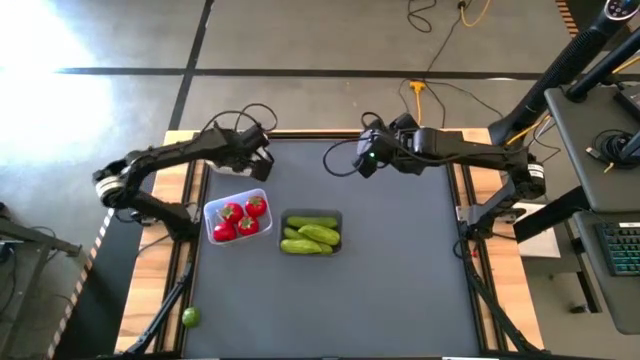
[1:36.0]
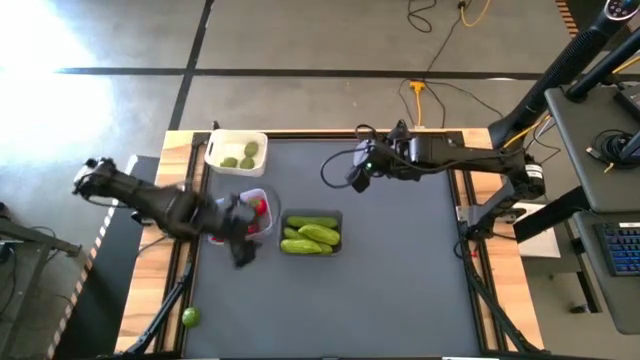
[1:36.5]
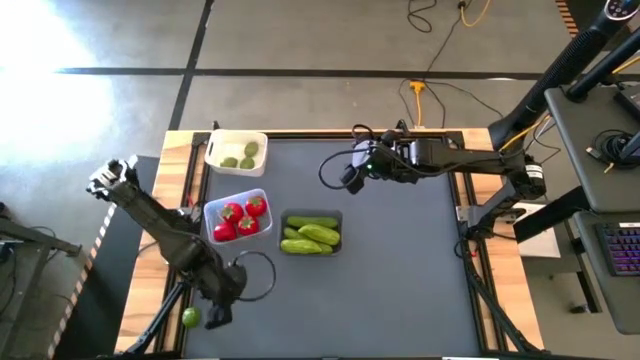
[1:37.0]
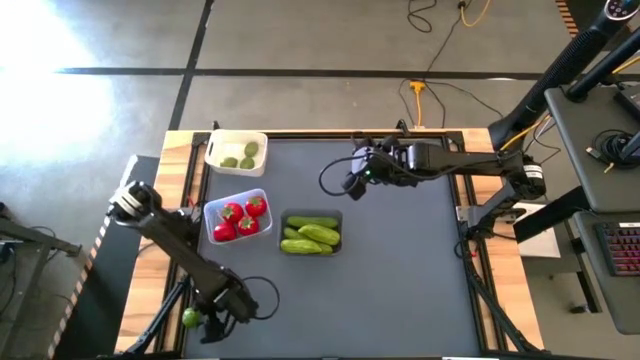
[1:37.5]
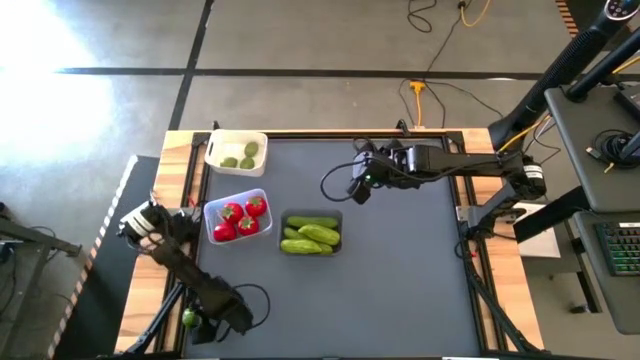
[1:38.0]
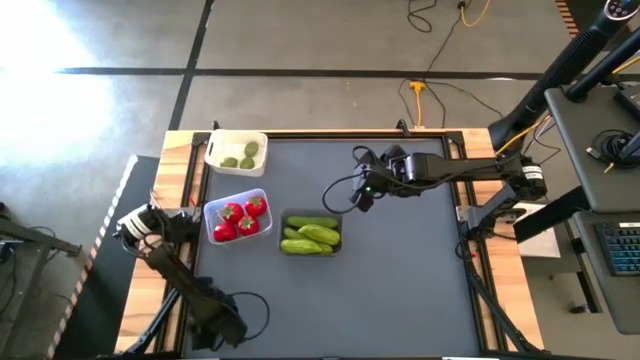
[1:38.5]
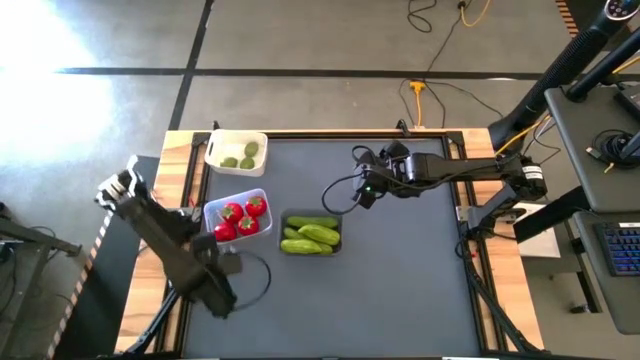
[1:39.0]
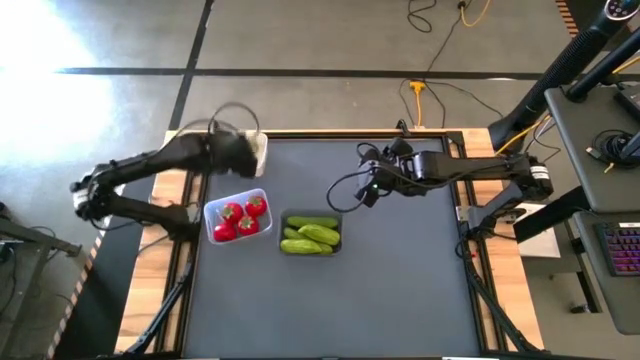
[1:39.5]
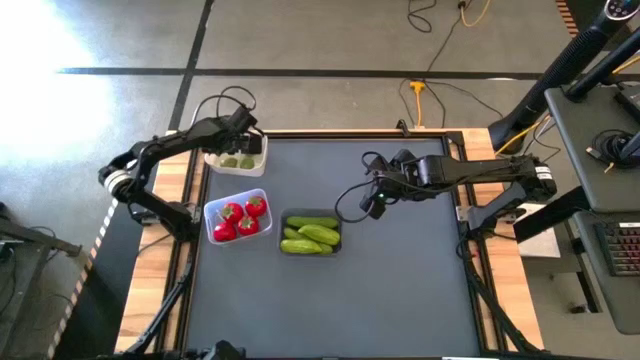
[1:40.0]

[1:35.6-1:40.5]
Task: Sort produce into baskets
Put the lemon into the white bin

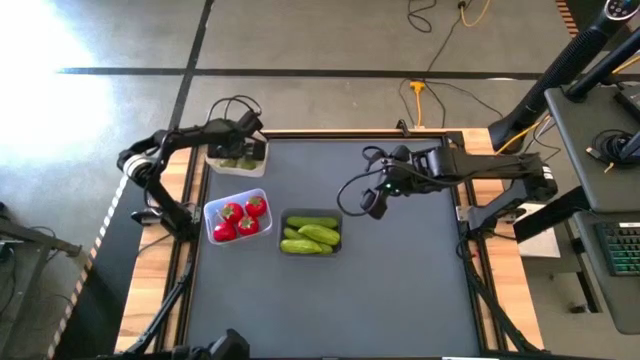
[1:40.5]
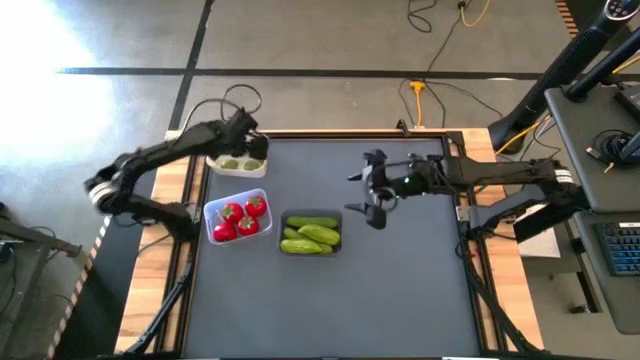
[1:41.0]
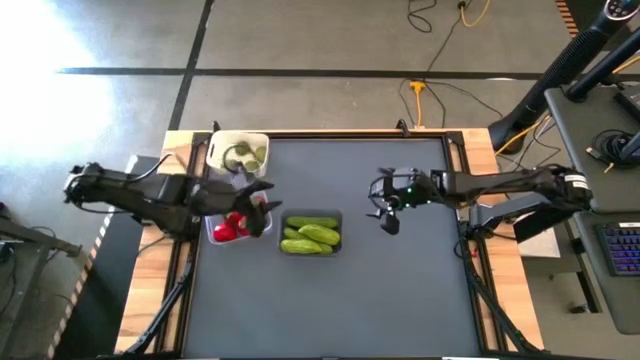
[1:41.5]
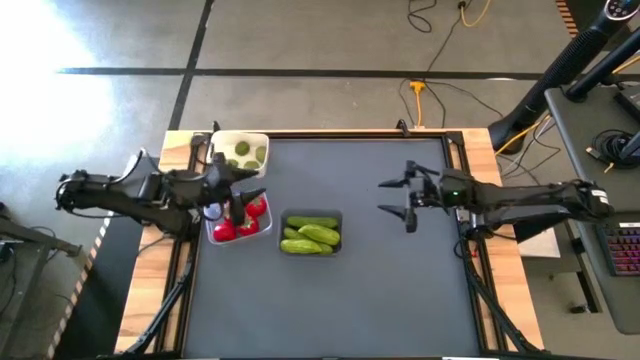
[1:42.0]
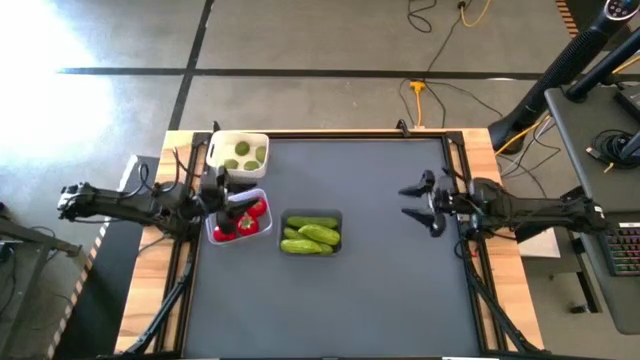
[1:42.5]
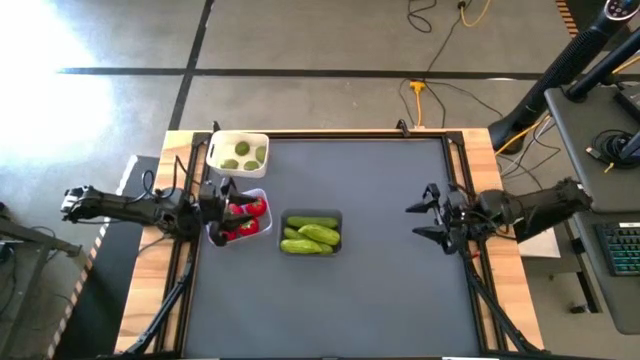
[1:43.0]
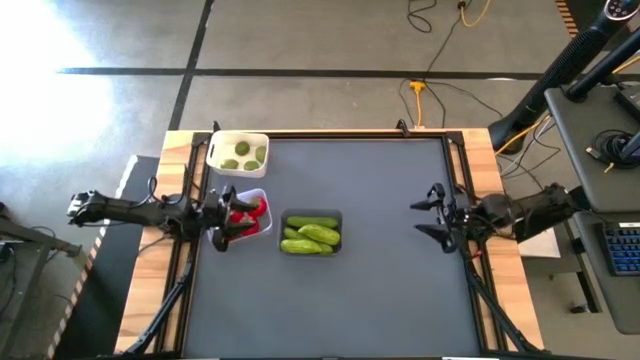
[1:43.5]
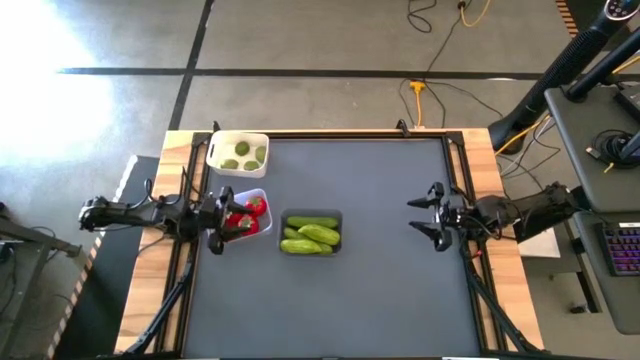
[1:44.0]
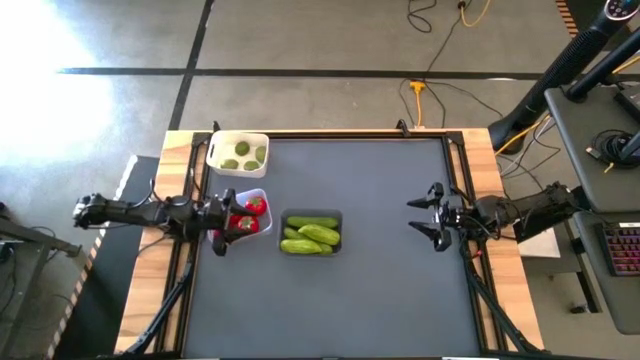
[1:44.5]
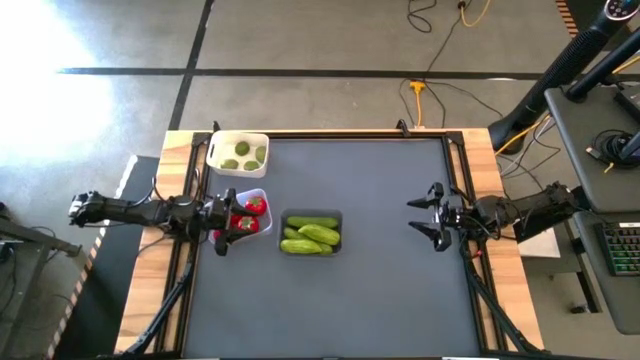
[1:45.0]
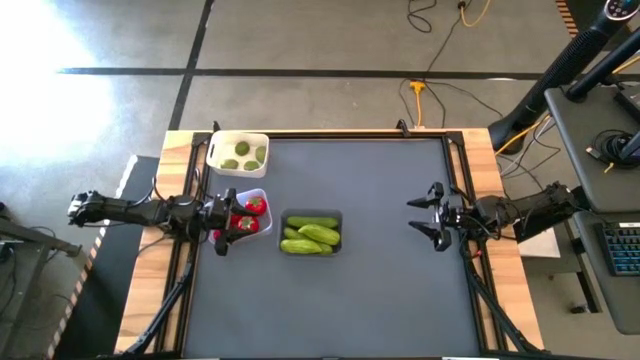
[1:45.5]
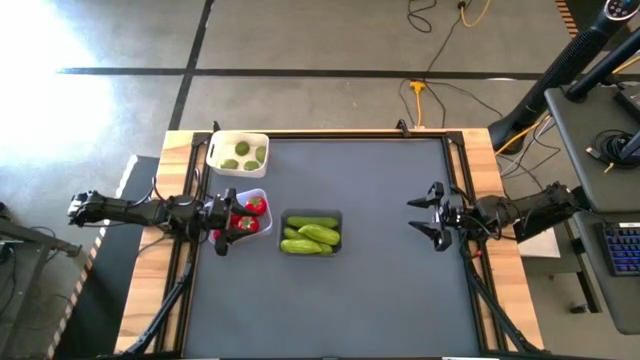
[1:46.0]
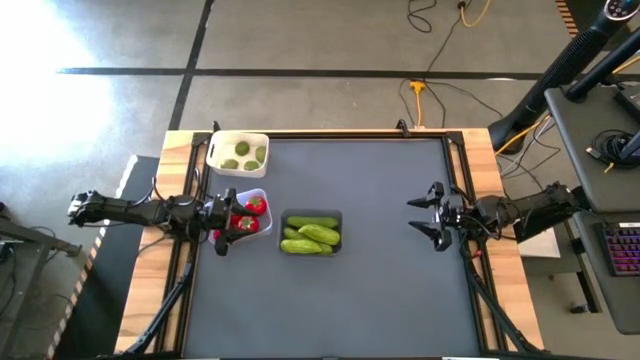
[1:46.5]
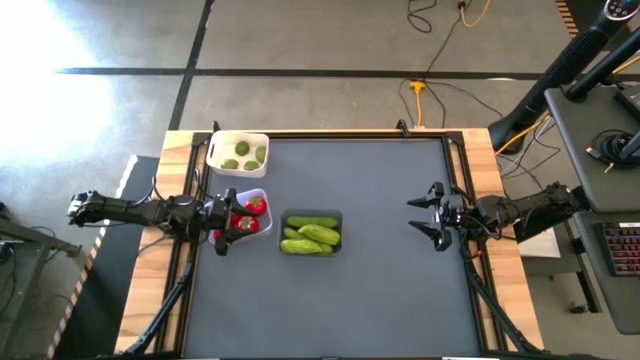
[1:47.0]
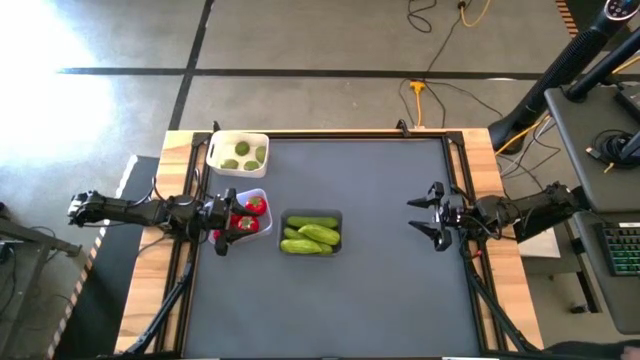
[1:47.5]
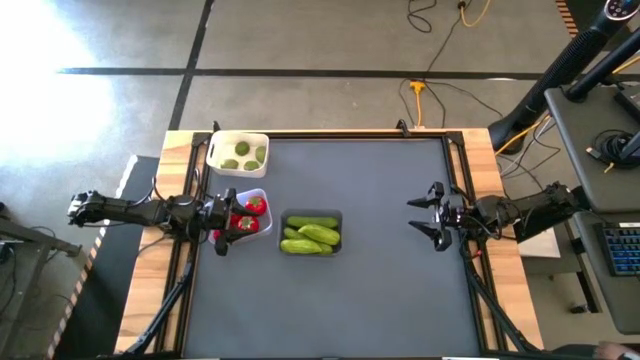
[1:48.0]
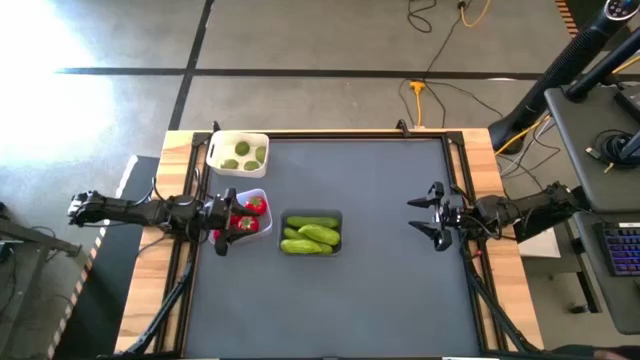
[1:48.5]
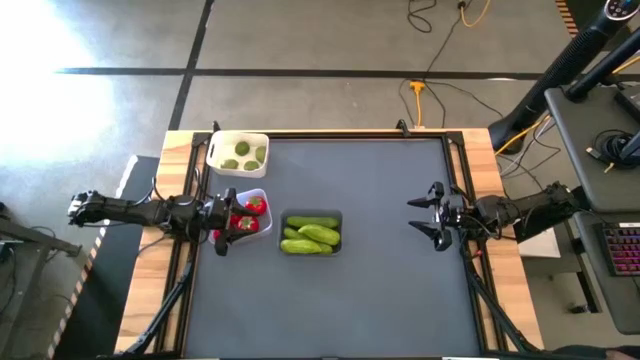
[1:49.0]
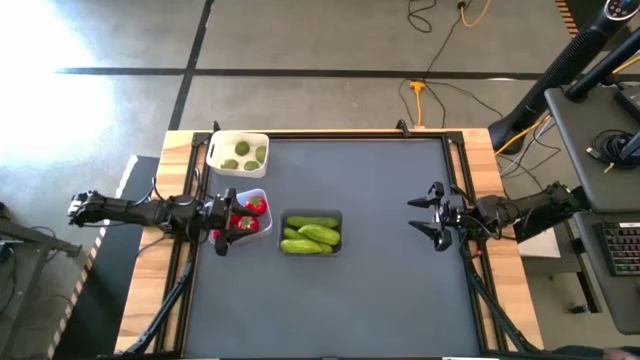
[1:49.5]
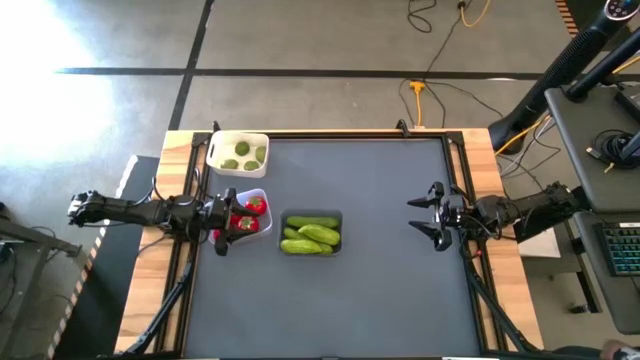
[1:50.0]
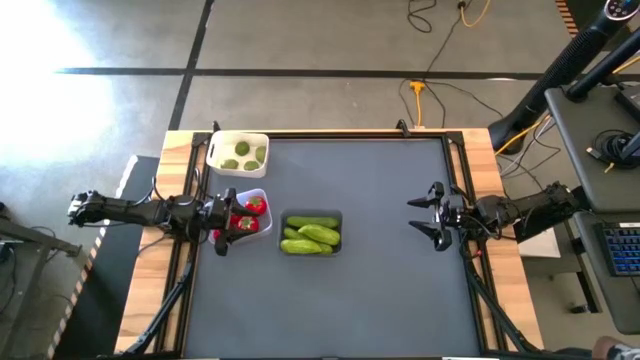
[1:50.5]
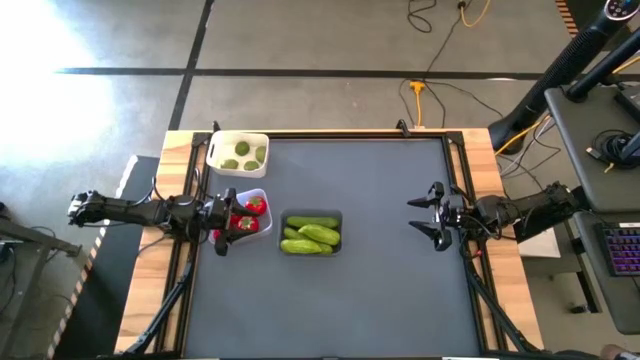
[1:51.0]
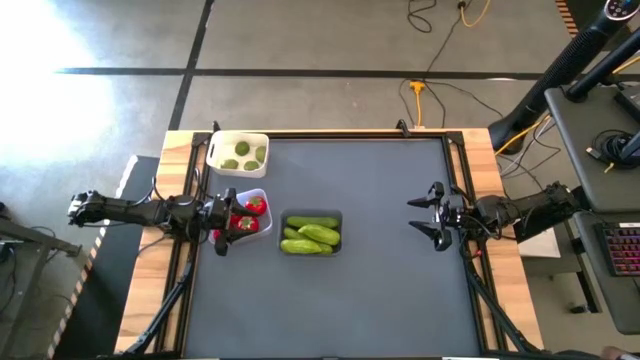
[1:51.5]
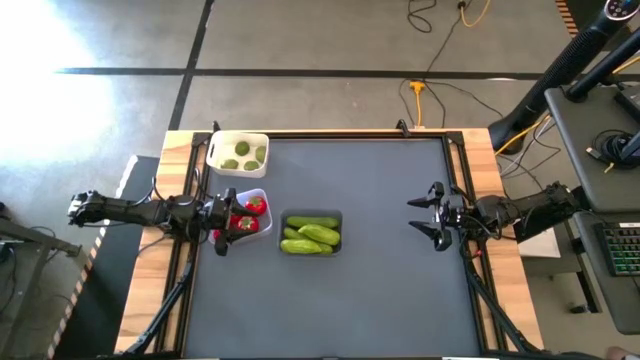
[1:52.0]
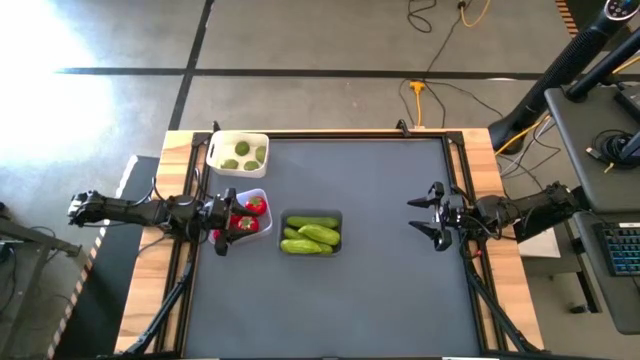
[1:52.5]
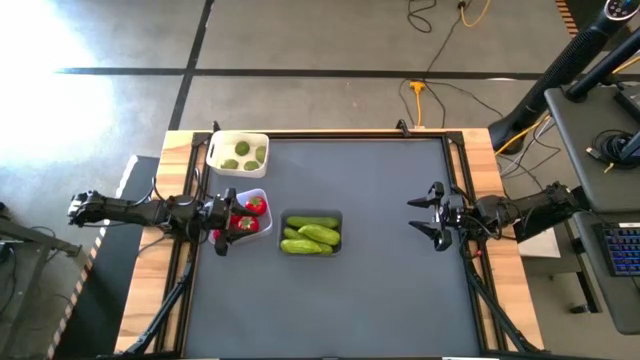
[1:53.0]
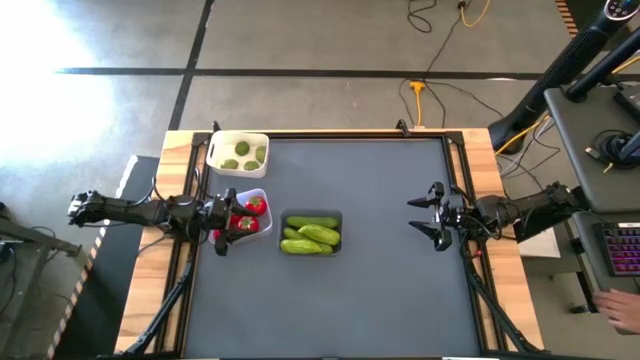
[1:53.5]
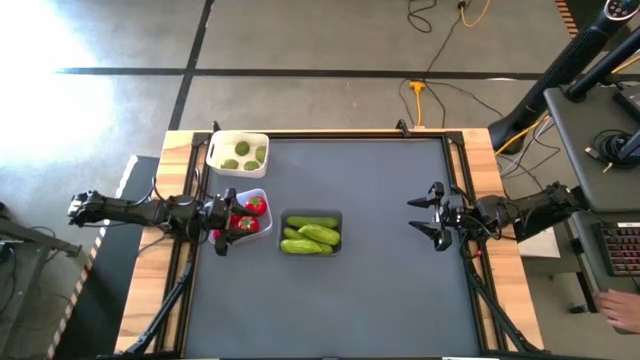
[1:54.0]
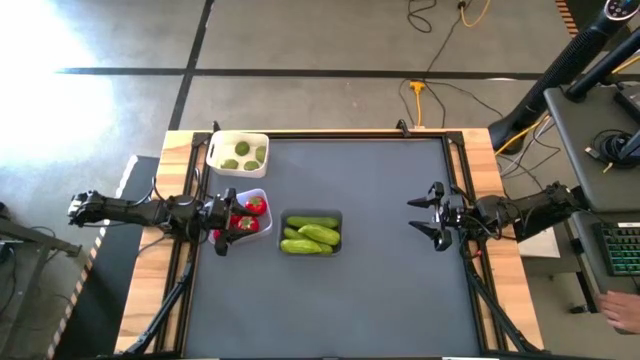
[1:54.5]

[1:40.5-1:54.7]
Return to Home Position

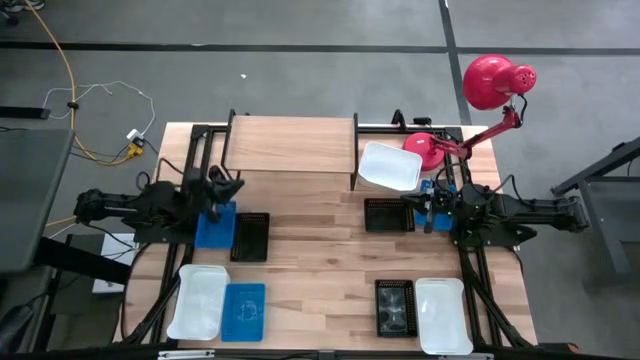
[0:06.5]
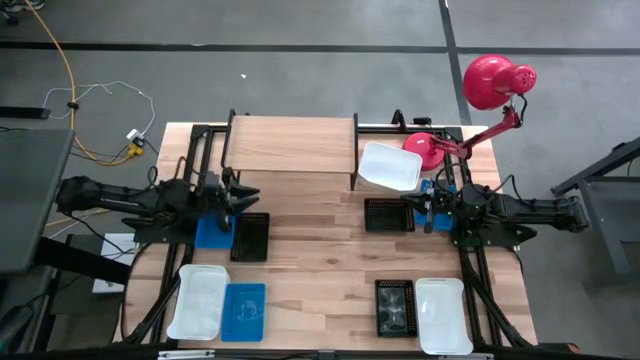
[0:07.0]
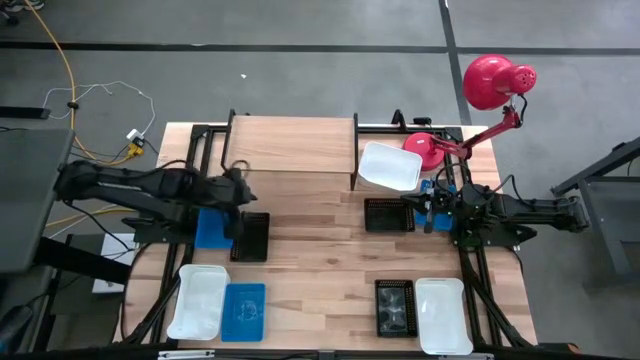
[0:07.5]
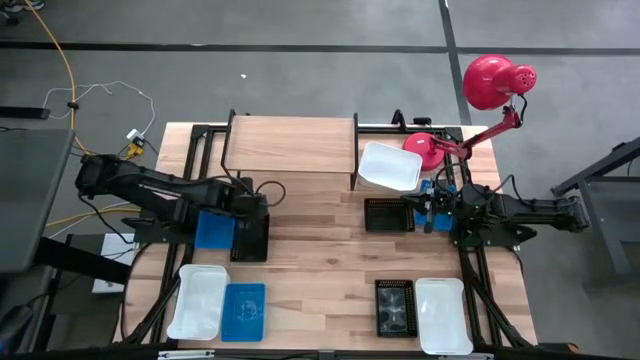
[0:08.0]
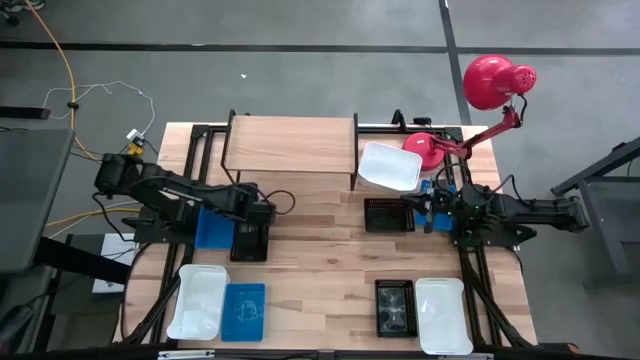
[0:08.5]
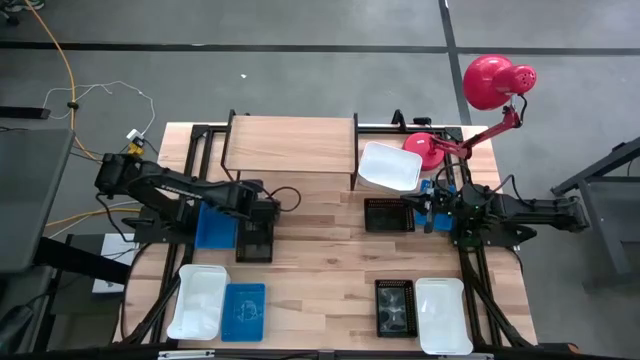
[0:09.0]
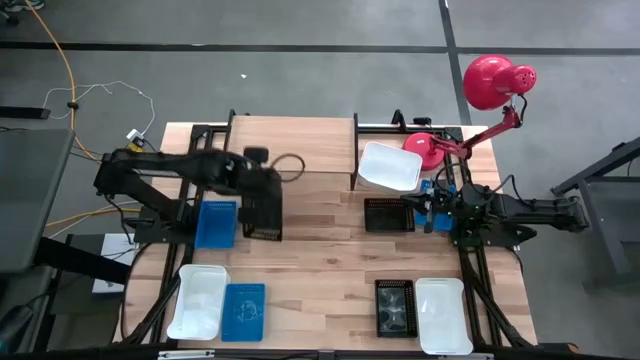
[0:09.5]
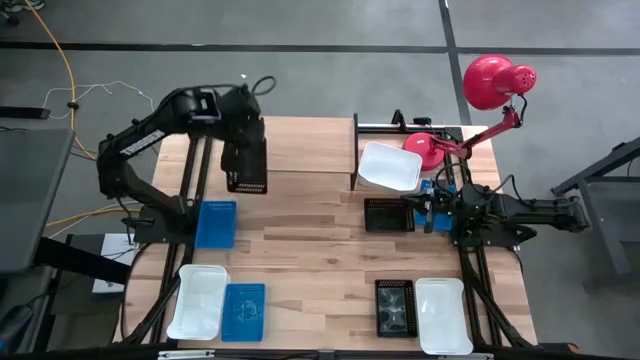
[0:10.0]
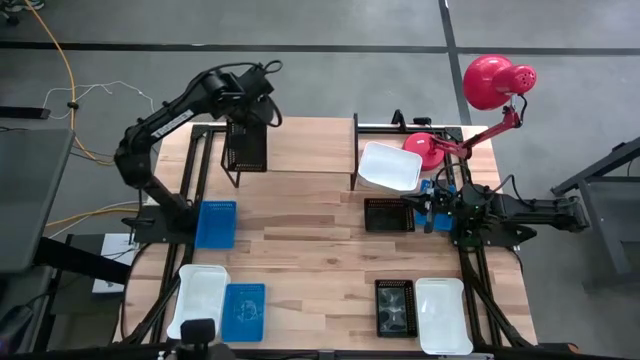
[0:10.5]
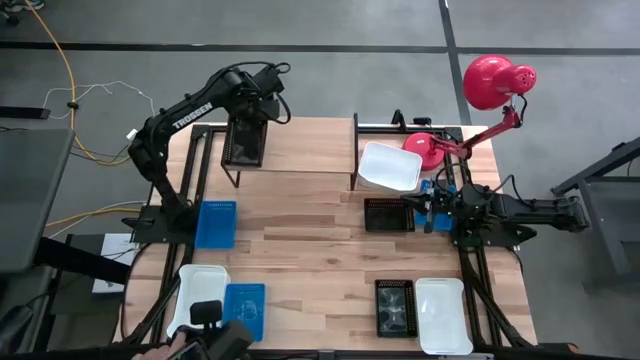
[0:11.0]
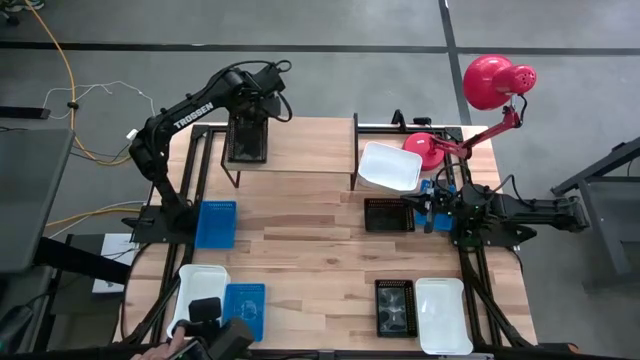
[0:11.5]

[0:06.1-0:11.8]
Task: Stack baskets on shelf by color
Put the left black bin on the shelf
